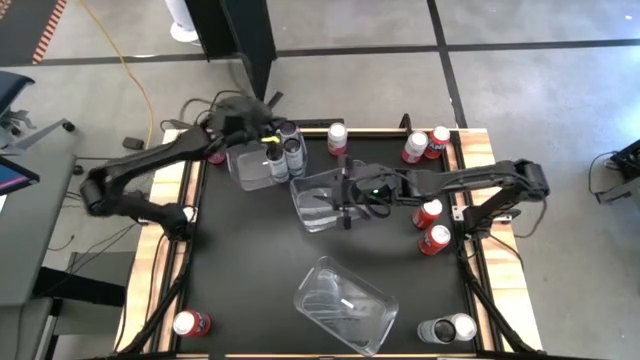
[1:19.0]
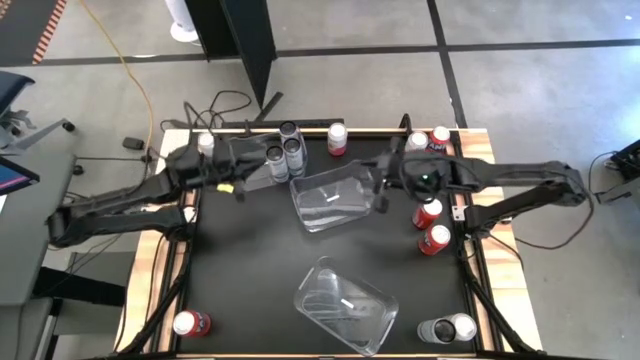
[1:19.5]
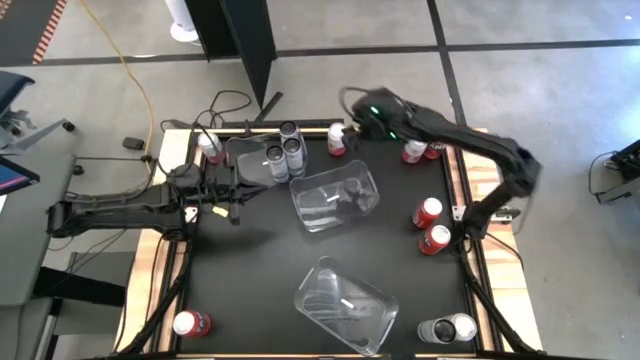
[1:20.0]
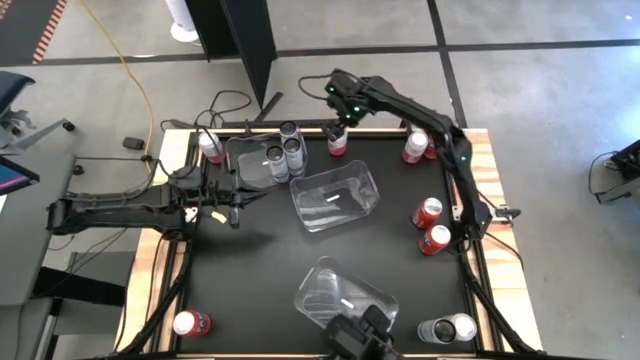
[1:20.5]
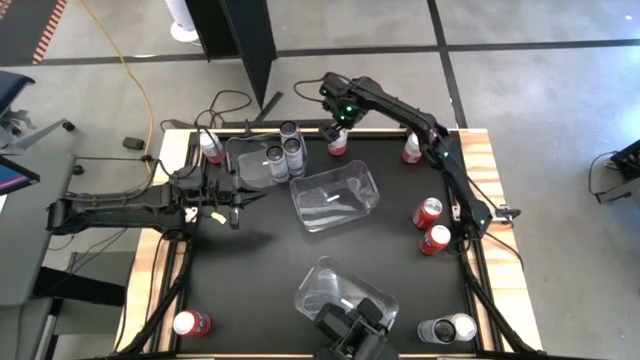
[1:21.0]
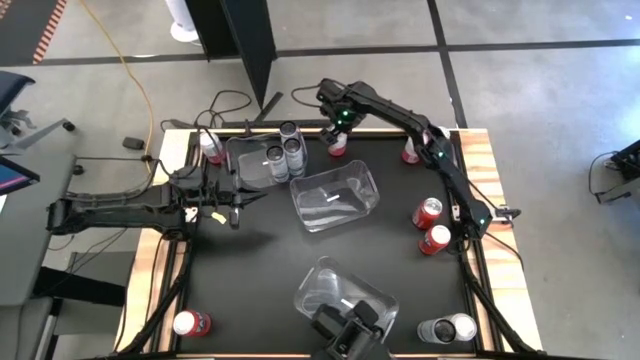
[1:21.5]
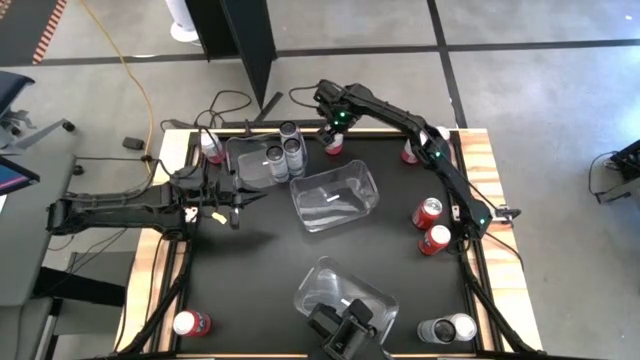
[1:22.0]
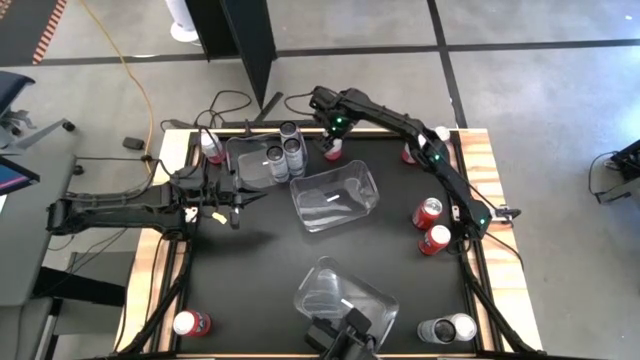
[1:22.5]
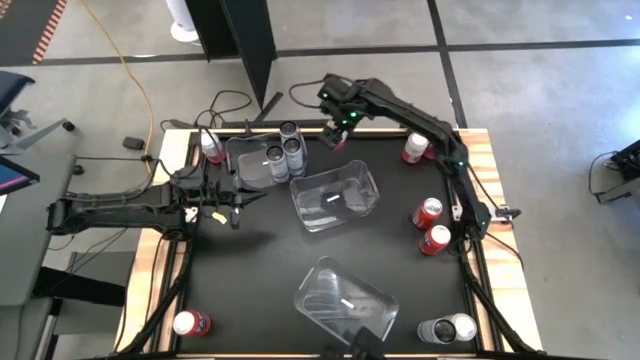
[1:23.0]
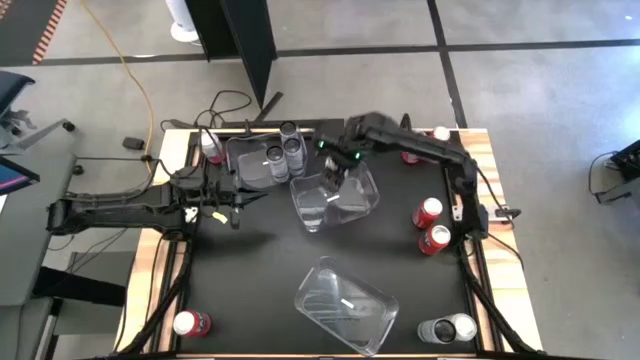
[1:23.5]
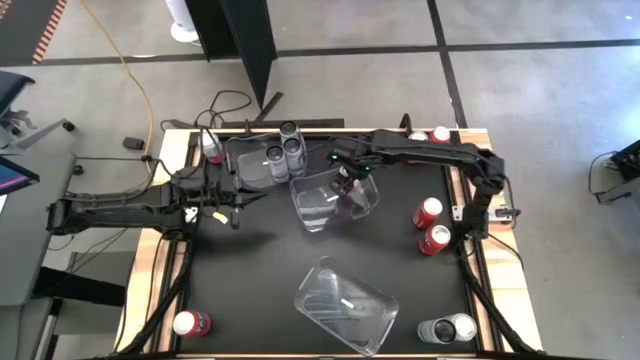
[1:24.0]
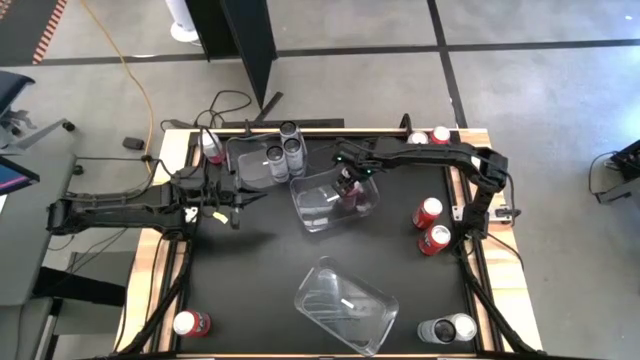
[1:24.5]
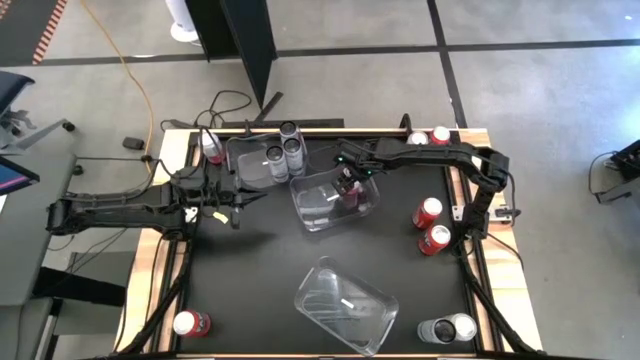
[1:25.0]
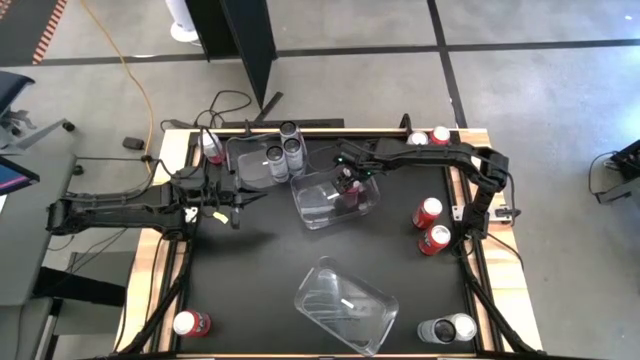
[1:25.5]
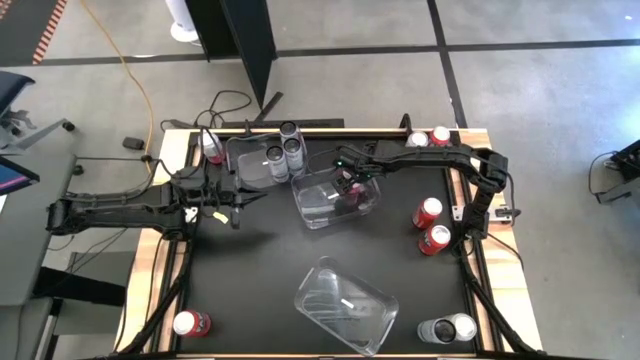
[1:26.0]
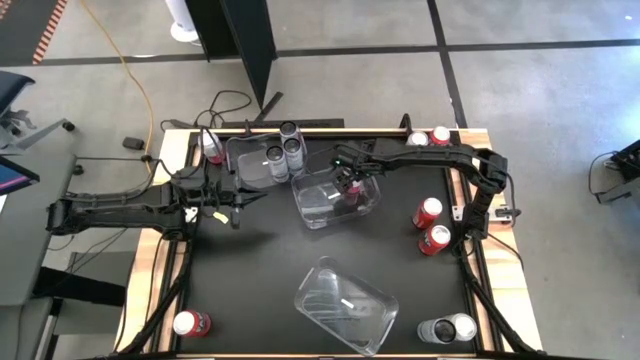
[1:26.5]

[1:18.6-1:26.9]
Task: Sort soda cans
Put the top center pink-white soda can in the middle transparent bin

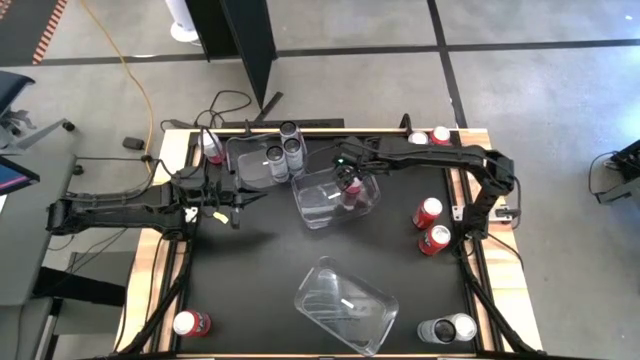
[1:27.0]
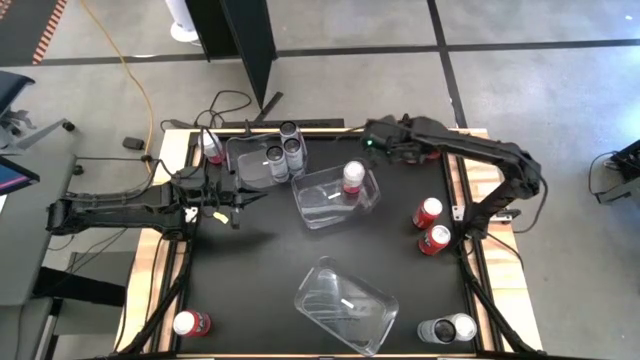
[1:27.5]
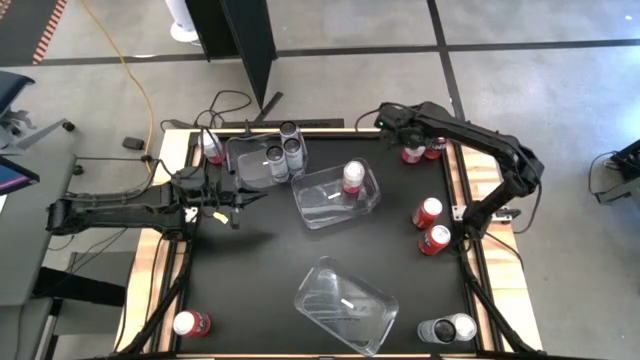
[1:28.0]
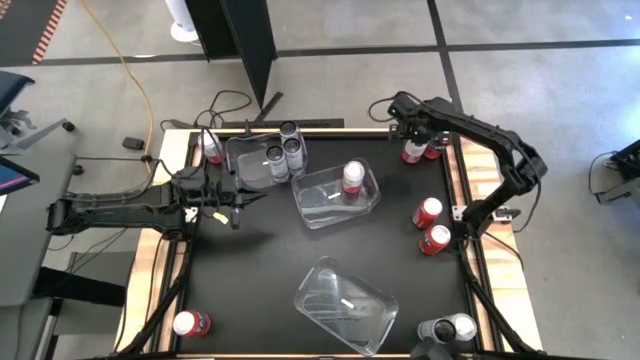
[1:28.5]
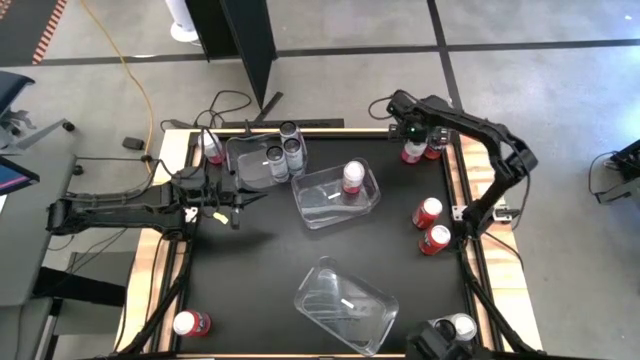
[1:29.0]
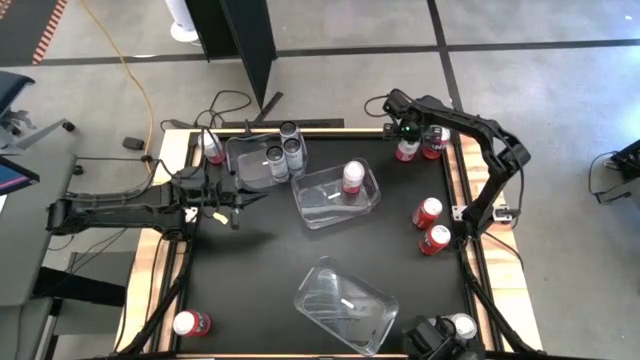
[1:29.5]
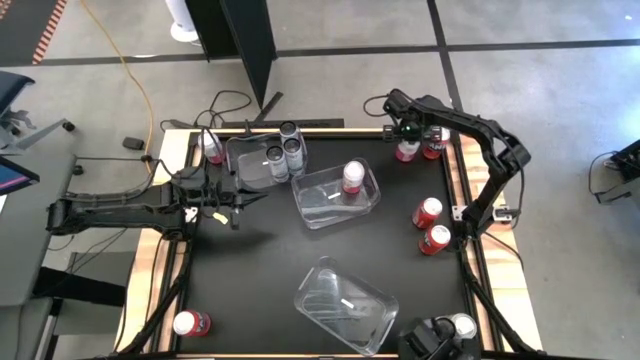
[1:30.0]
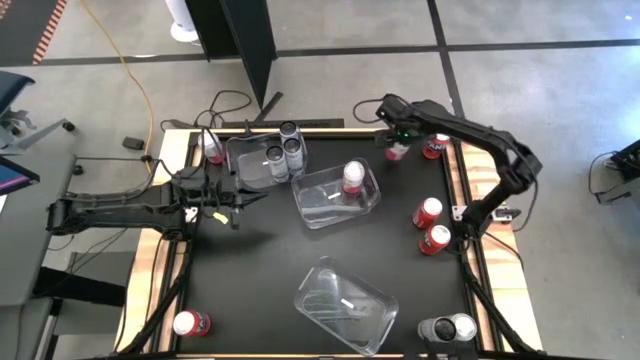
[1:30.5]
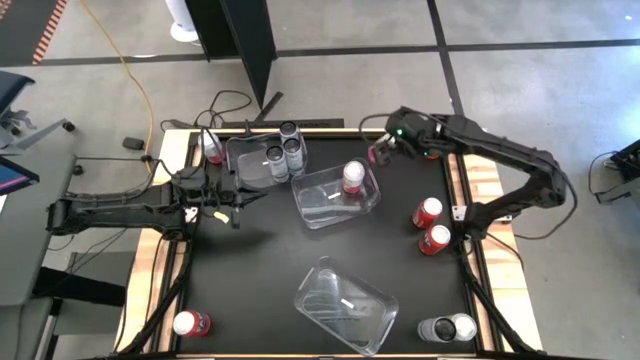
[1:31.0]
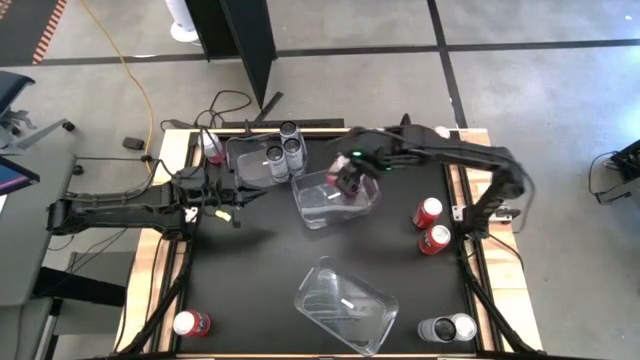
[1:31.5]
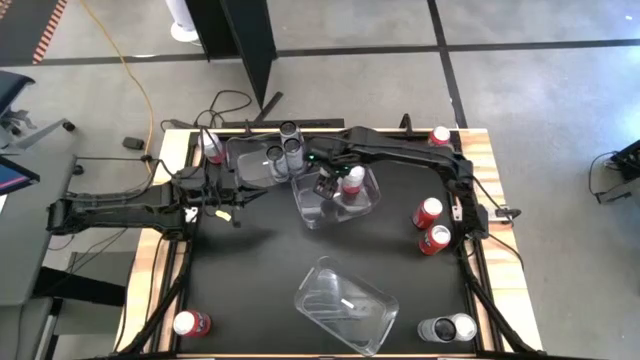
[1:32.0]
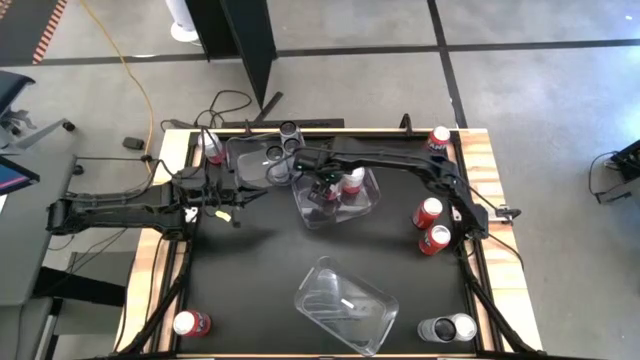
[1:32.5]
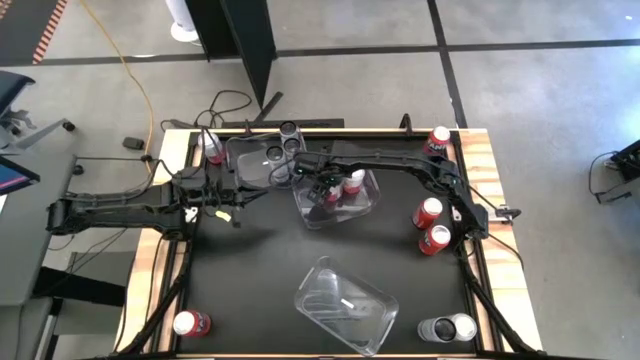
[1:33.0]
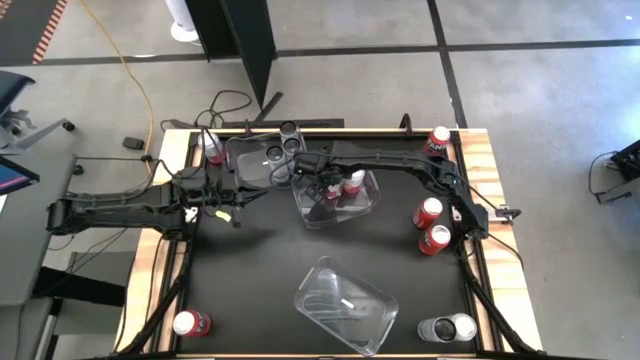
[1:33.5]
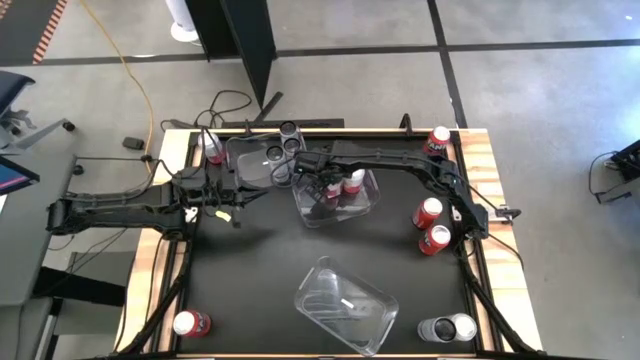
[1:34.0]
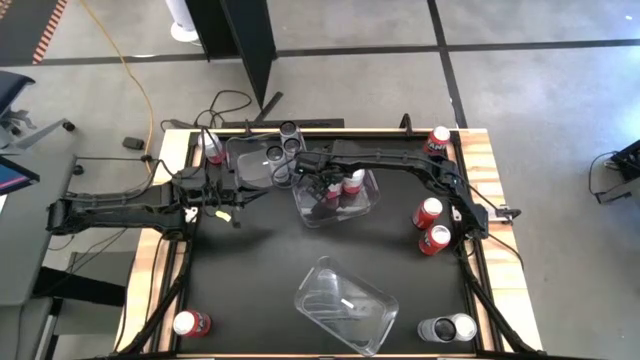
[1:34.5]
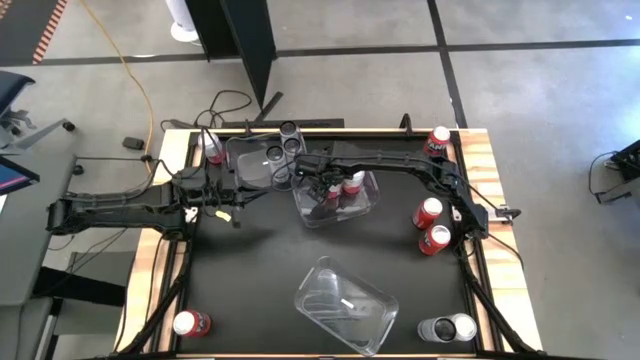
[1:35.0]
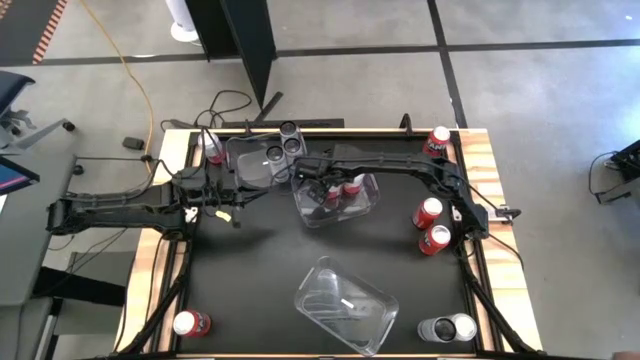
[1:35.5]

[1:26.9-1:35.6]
Put the top right pink-white soda can in the middle transparent bin
